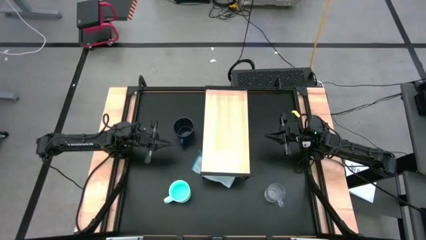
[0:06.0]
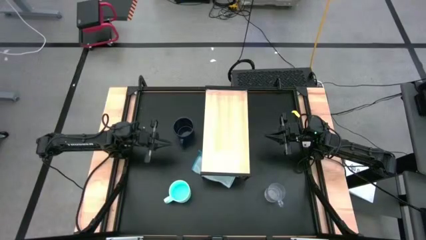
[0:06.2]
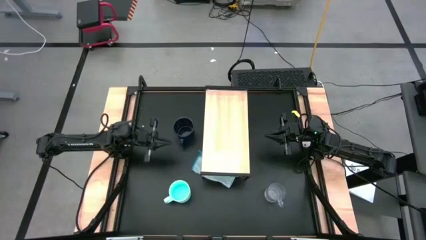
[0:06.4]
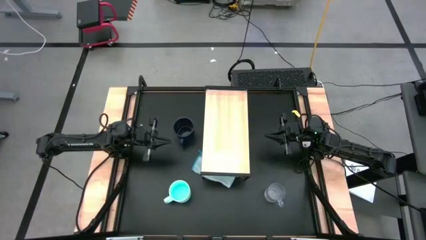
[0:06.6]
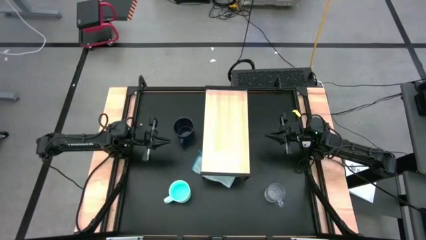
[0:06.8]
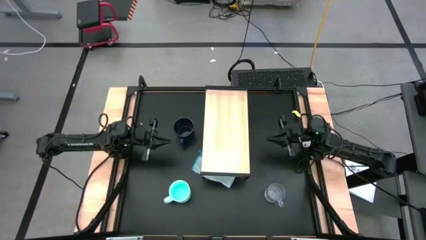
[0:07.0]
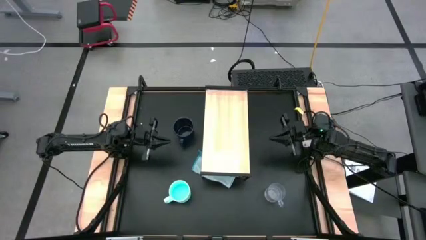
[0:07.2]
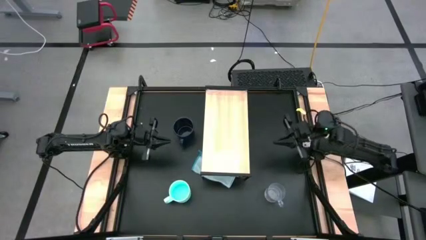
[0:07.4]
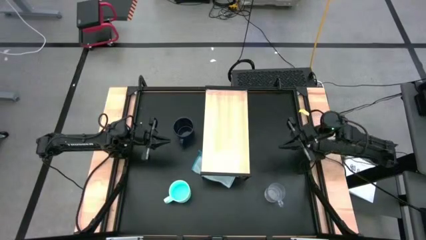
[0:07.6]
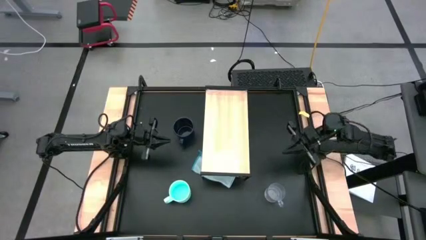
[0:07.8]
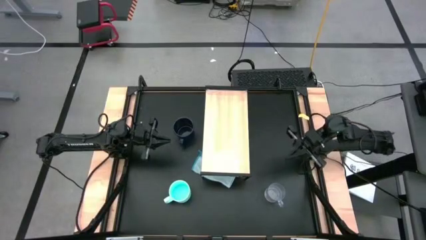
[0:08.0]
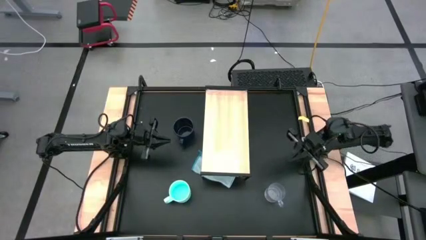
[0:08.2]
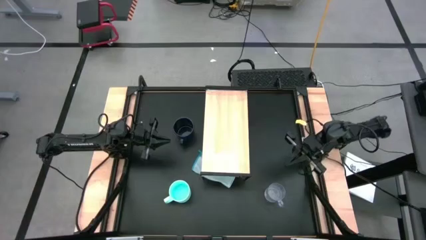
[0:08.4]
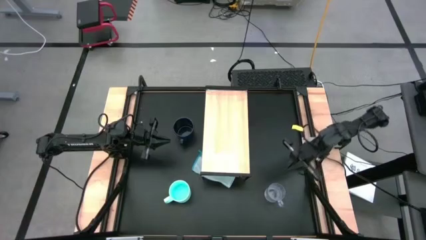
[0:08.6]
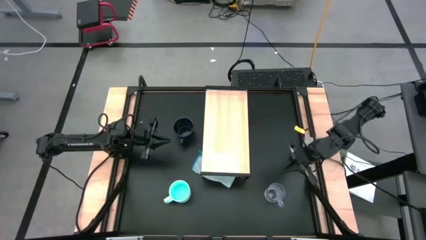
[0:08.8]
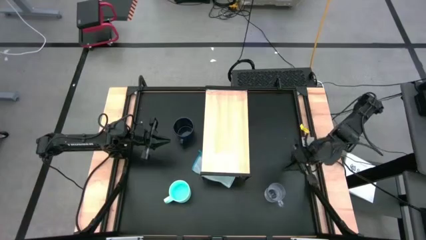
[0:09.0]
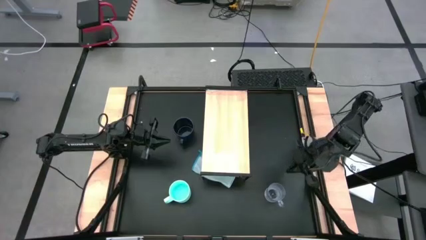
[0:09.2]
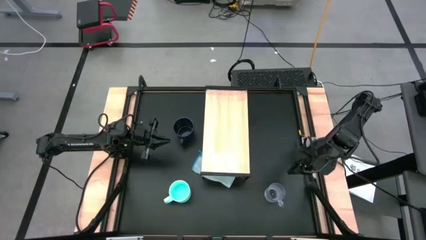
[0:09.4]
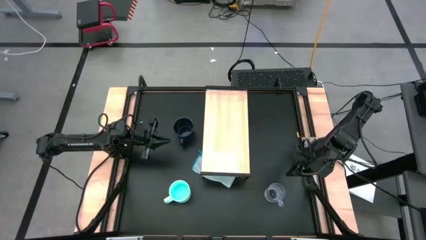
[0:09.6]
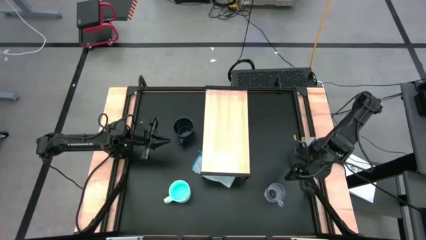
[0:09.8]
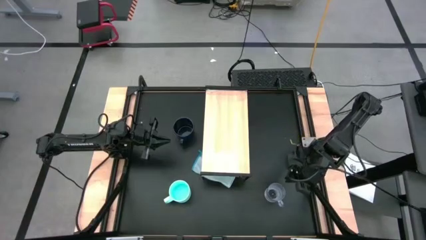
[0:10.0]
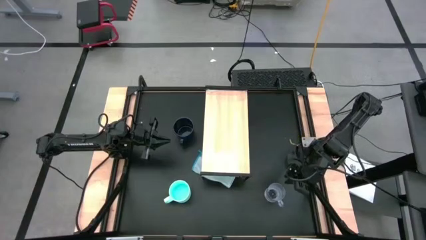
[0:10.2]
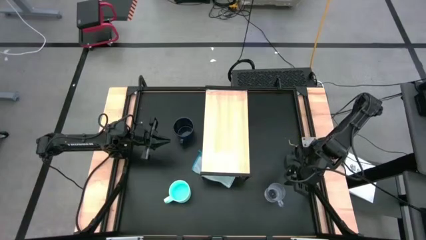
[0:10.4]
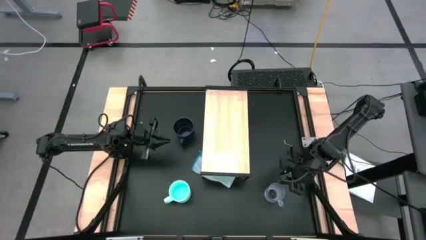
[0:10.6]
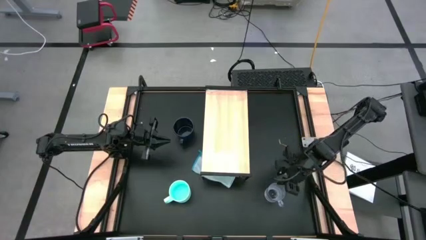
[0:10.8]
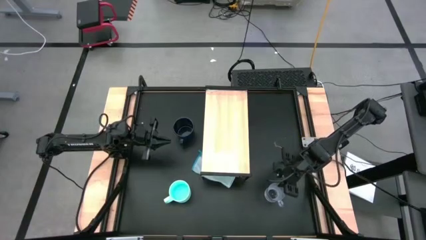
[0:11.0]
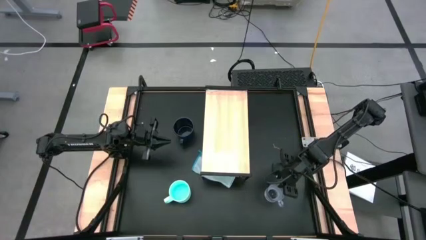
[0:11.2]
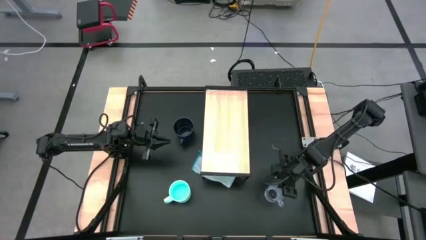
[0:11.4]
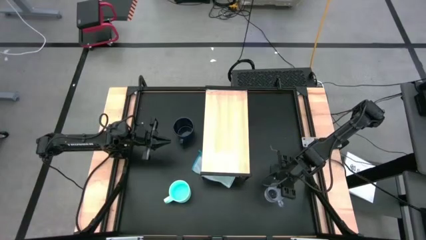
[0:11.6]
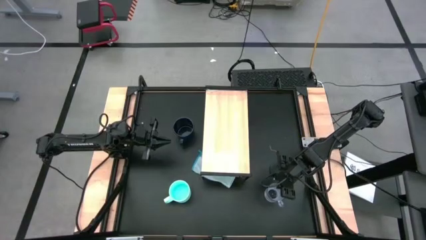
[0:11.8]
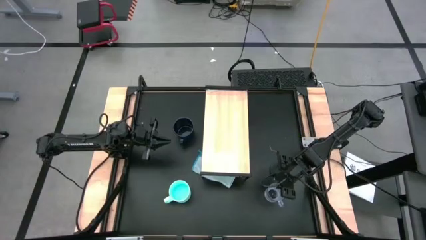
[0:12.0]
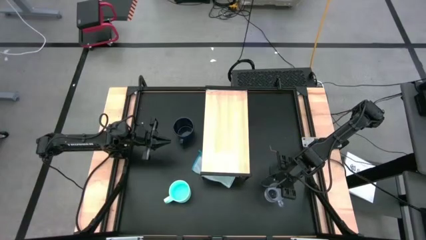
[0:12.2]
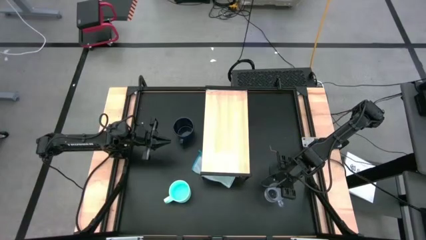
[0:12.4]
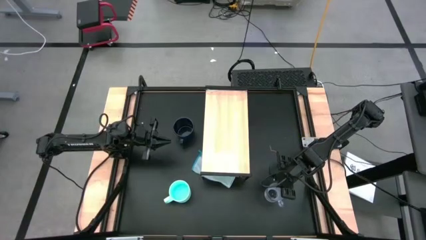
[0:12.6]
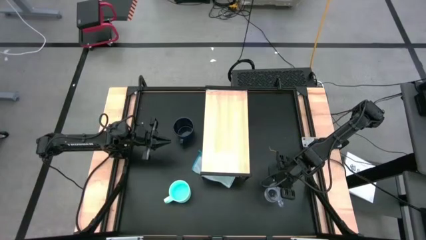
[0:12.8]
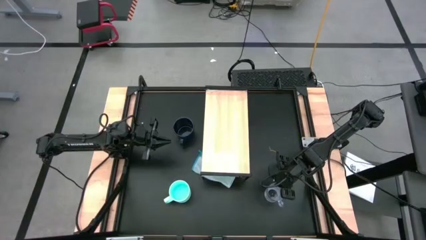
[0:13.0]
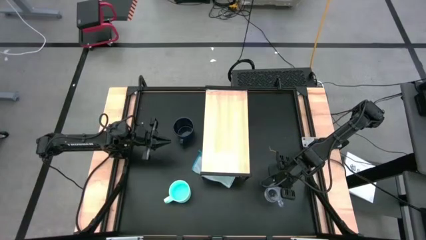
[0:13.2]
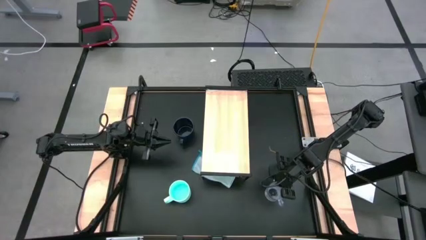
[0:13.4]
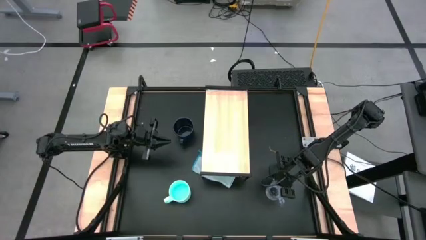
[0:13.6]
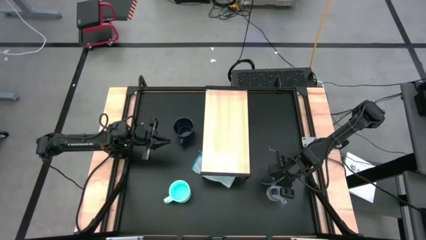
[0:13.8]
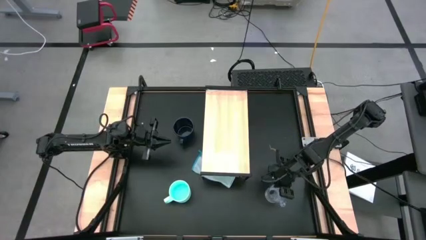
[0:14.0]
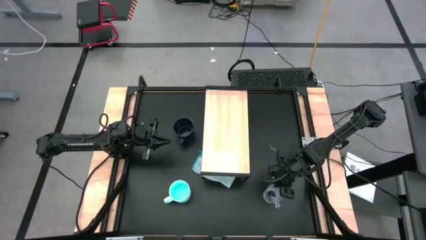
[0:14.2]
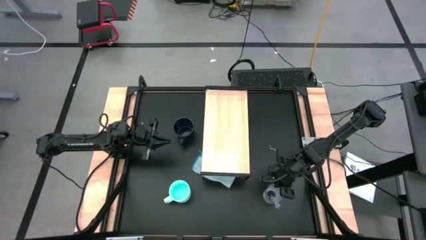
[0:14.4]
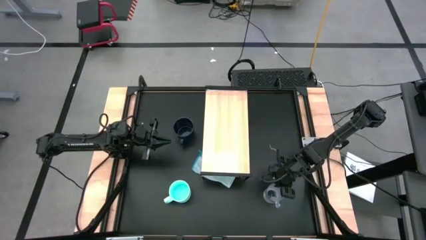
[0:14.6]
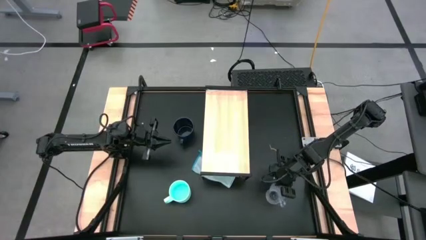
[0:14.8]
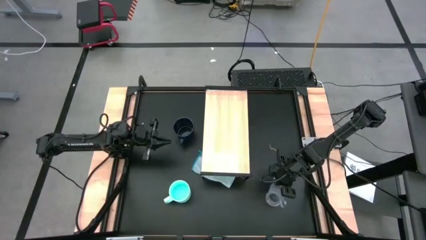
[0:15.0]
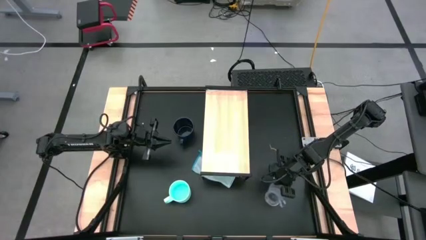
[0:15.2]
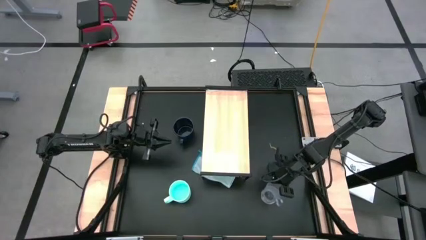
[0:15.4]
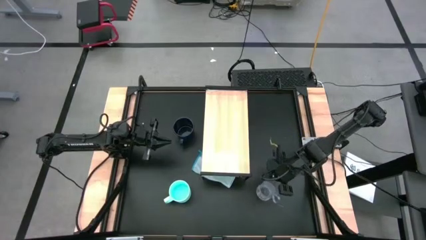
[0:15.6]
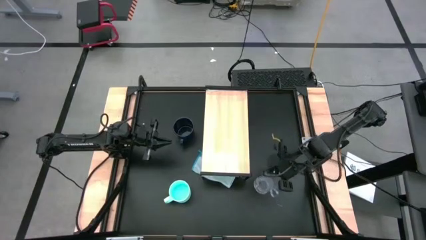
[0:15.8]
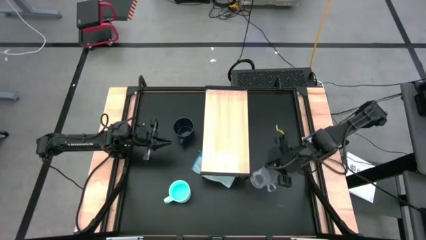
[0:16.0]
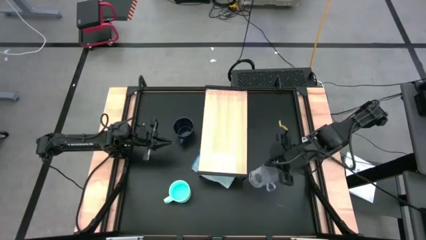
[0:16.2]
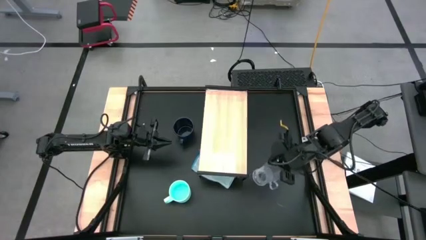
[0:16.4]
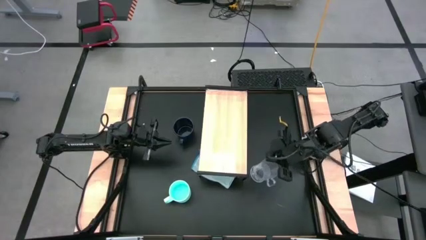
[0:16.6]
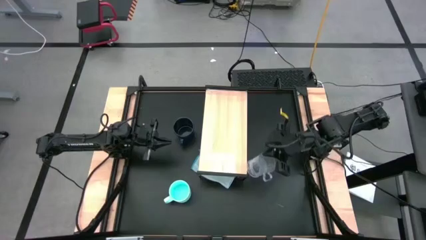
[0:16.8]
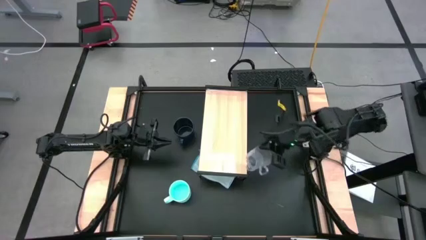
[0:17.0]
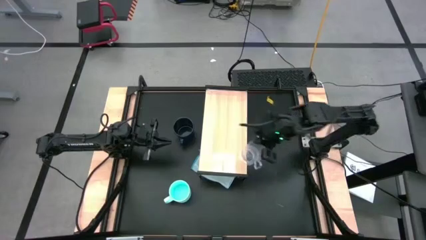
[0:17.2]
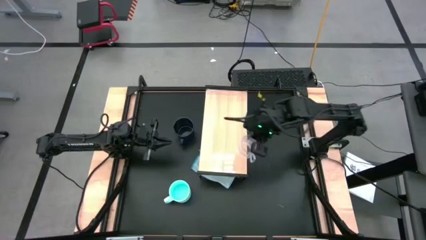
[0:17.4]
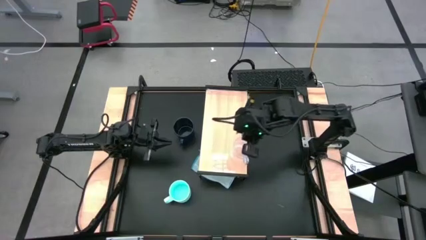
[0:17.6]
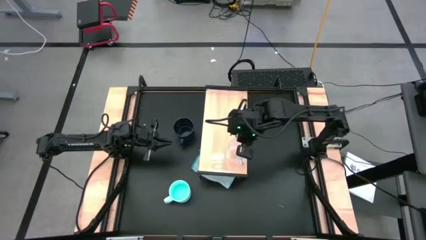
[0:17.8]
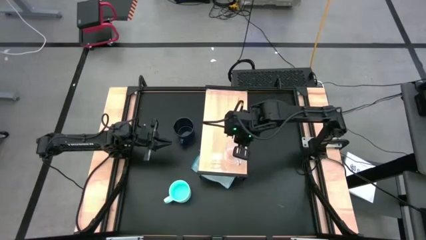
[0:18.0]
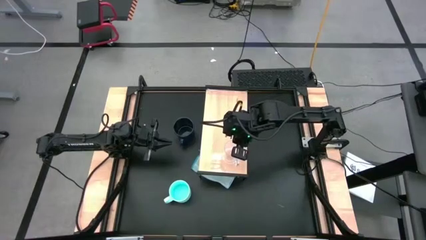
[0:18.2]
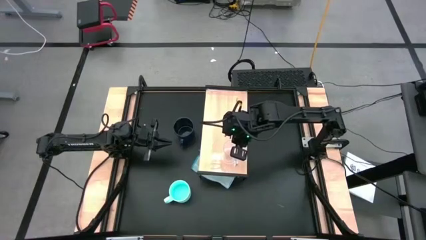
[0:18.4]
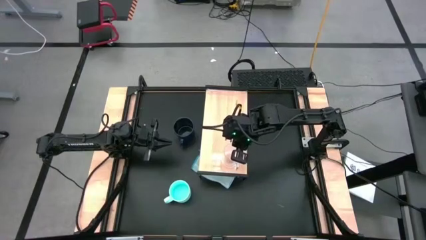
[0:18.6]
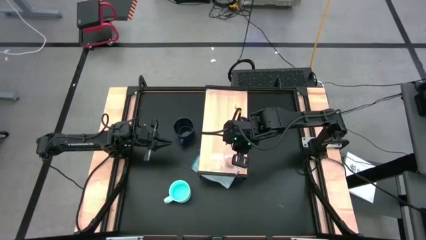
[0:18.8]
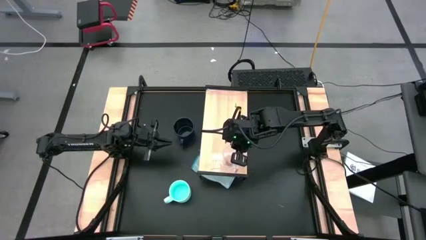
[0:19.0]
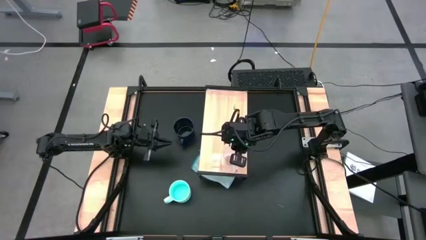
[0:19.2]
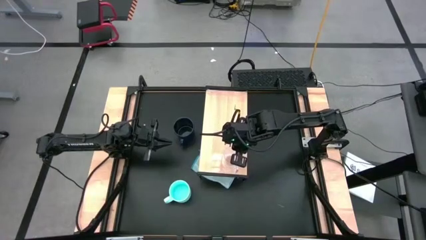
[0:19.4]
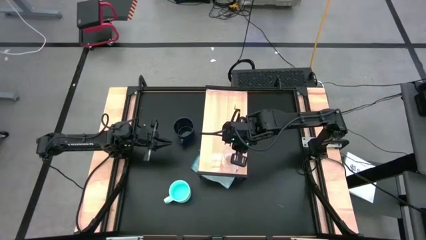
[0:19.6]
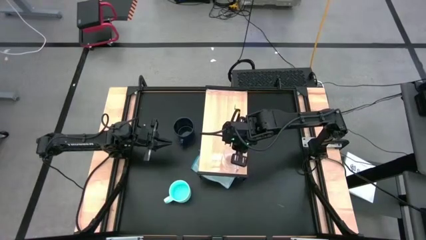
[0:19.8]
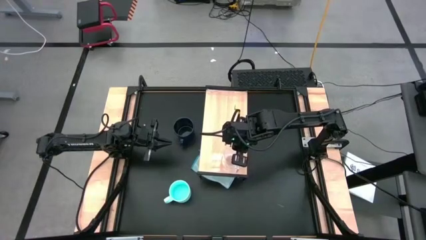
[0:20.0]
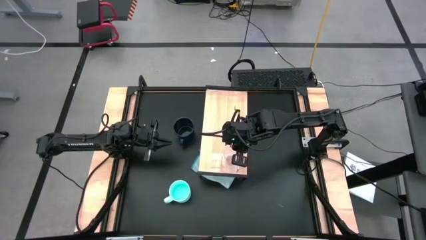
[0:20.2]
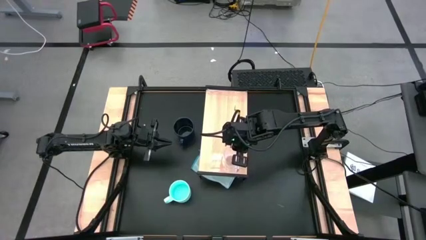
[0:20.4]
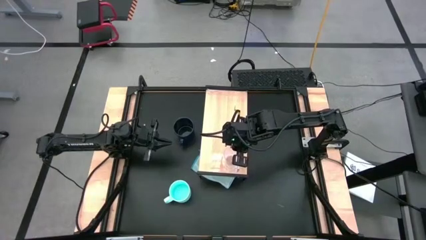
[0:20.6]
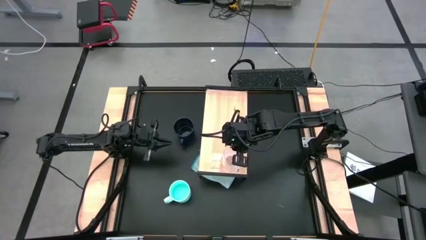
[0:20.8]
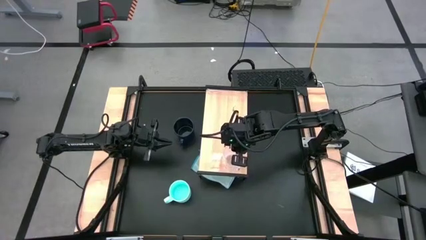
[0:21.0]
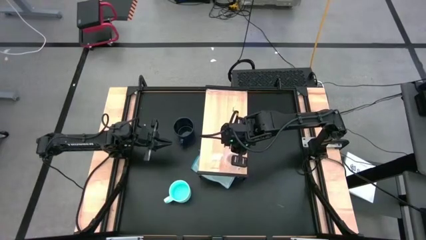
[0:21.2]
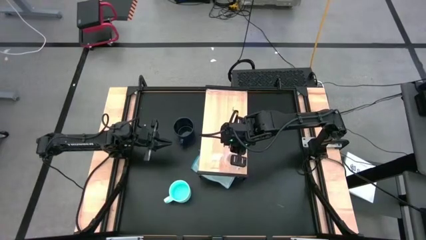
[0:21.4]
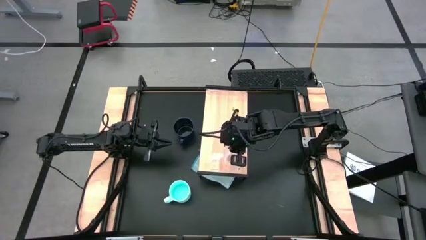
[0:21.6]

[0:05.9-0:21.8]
Task: Stack small to large cups/mugs on shelf
Put the transparent mug on the shelf
